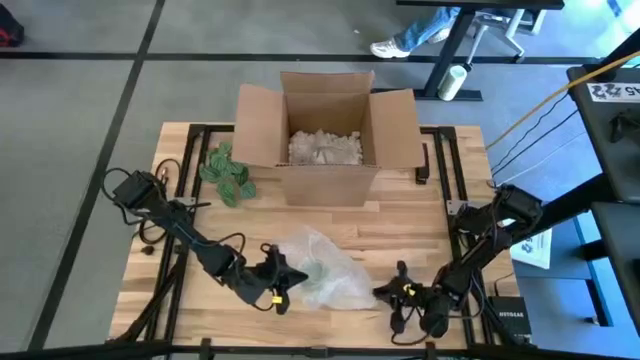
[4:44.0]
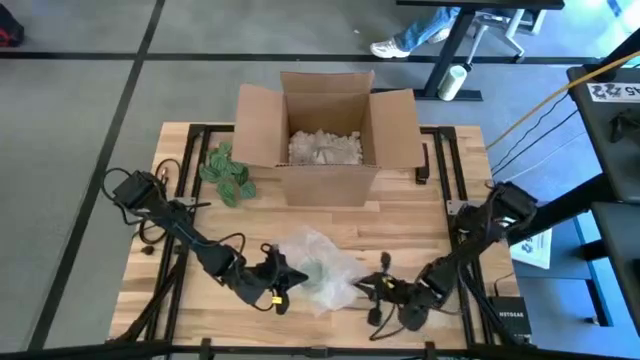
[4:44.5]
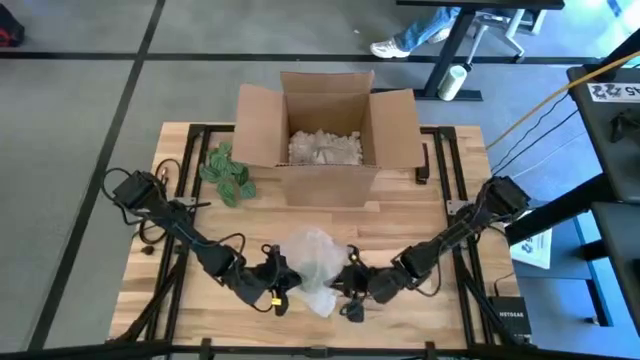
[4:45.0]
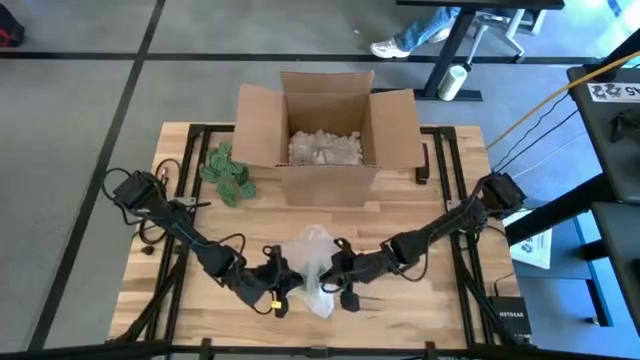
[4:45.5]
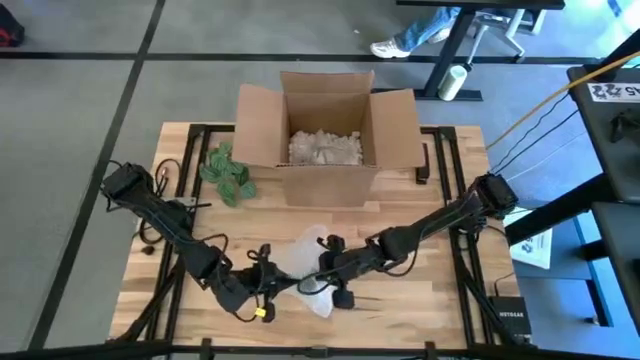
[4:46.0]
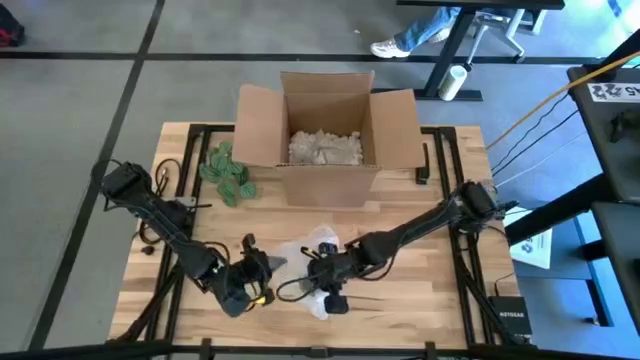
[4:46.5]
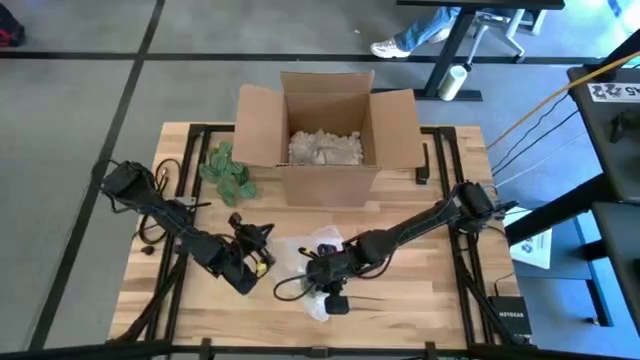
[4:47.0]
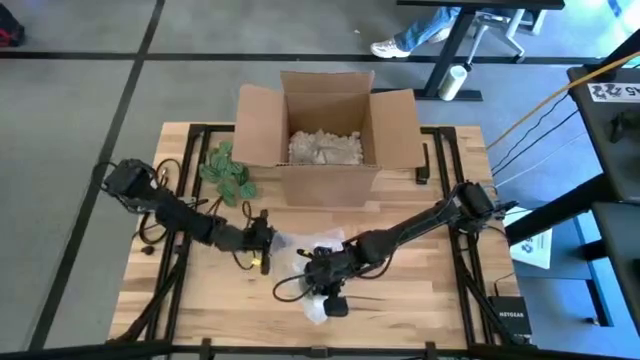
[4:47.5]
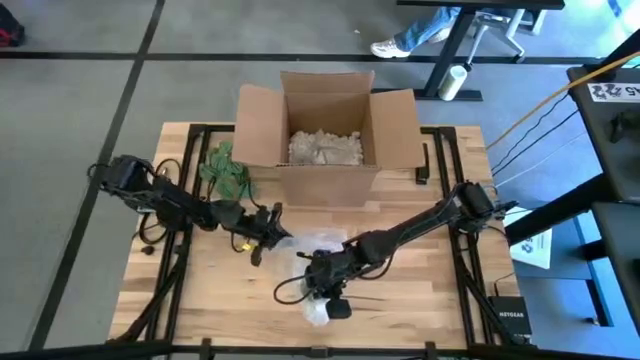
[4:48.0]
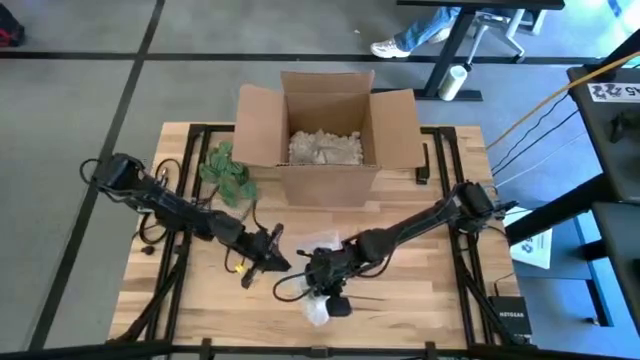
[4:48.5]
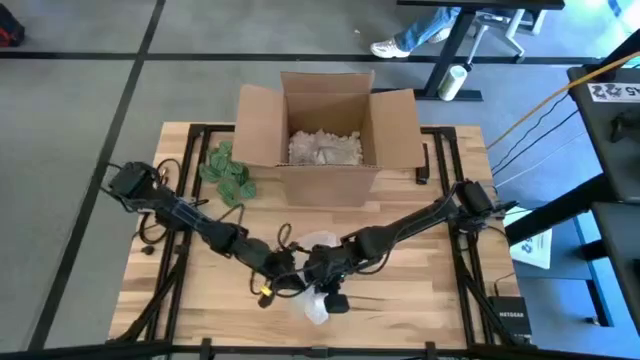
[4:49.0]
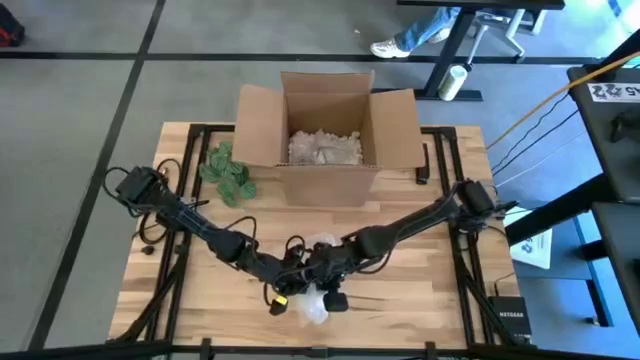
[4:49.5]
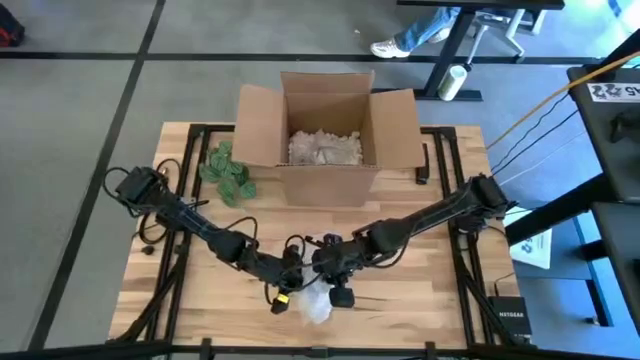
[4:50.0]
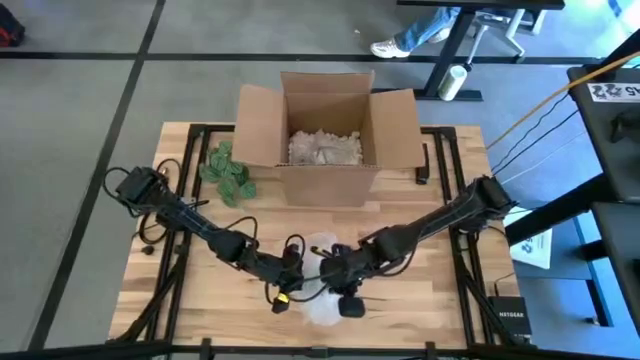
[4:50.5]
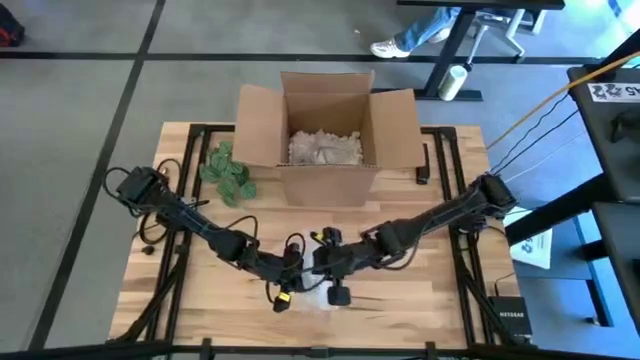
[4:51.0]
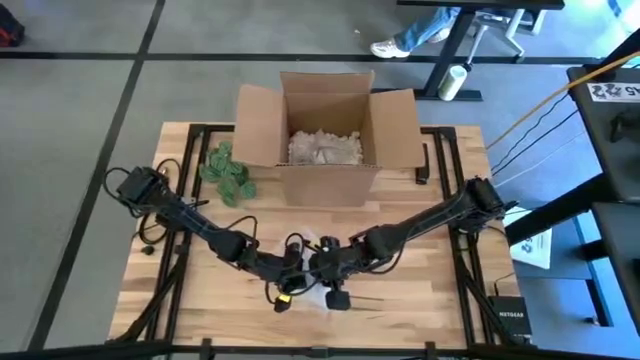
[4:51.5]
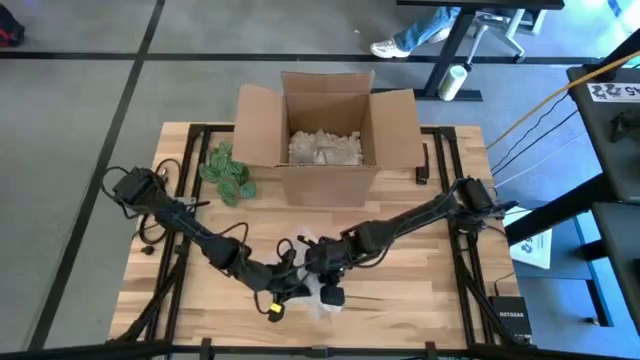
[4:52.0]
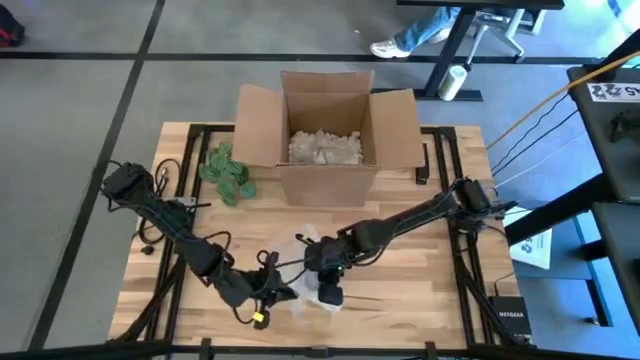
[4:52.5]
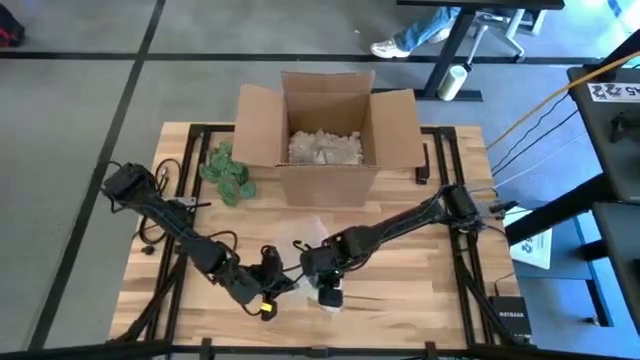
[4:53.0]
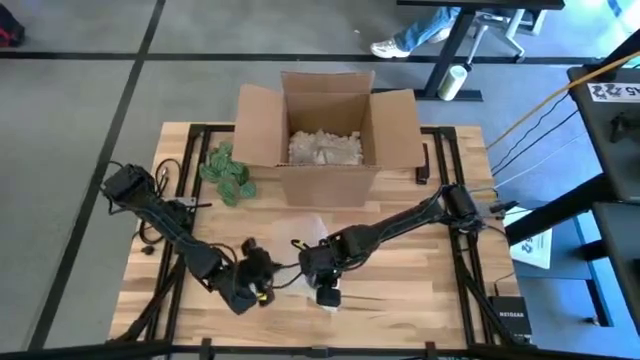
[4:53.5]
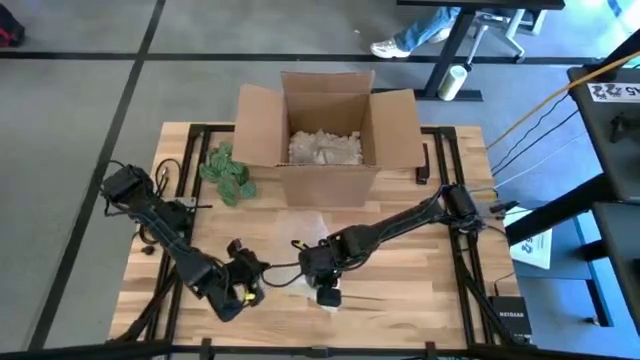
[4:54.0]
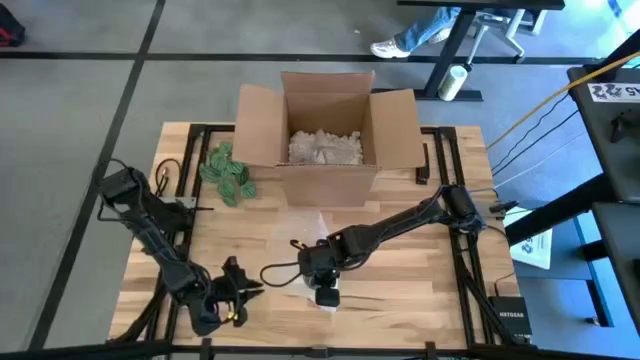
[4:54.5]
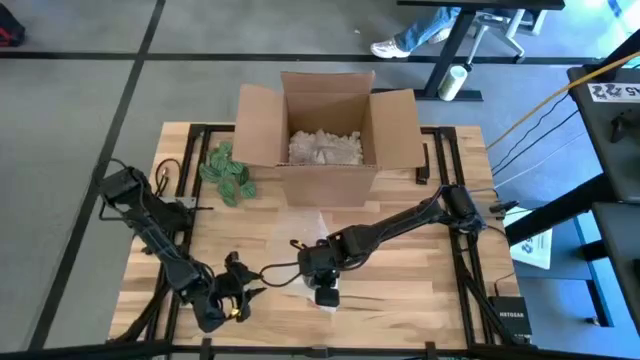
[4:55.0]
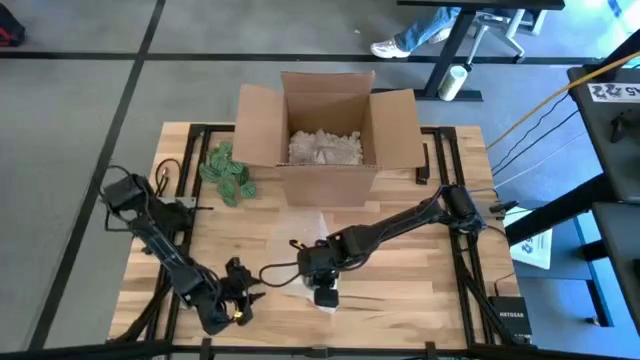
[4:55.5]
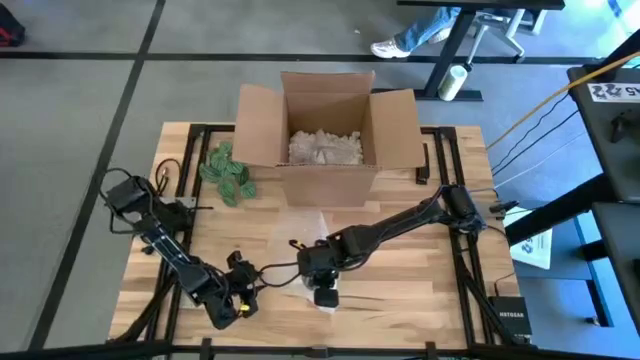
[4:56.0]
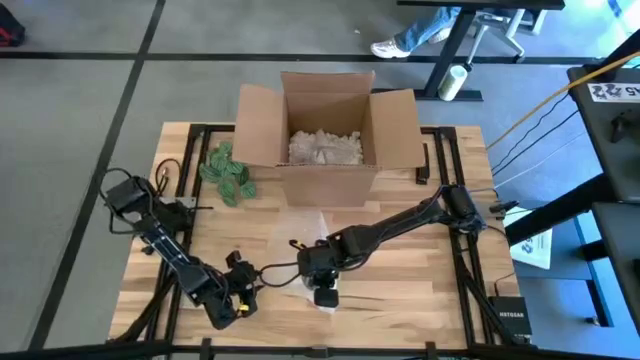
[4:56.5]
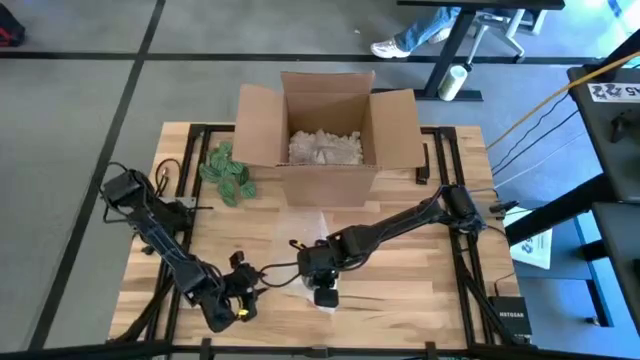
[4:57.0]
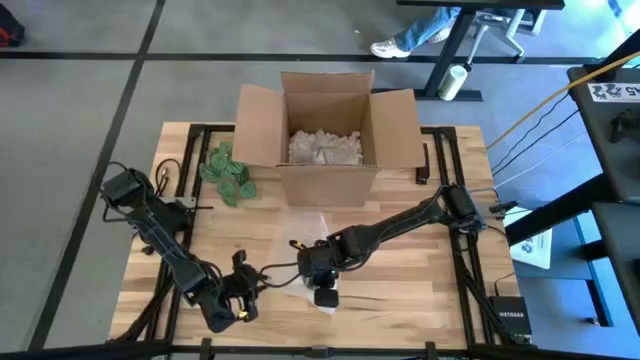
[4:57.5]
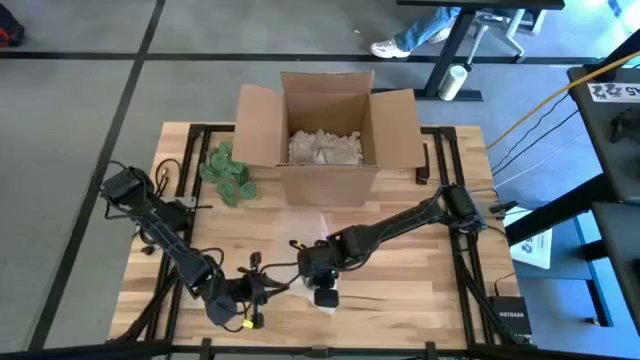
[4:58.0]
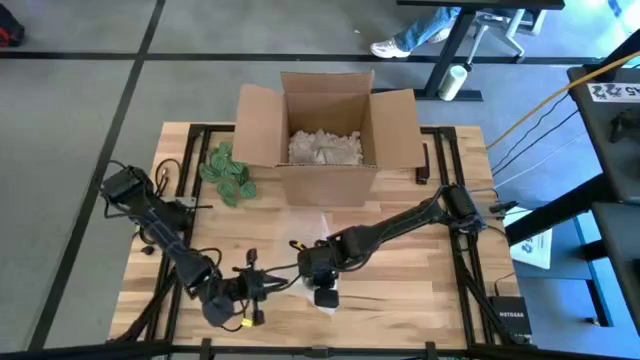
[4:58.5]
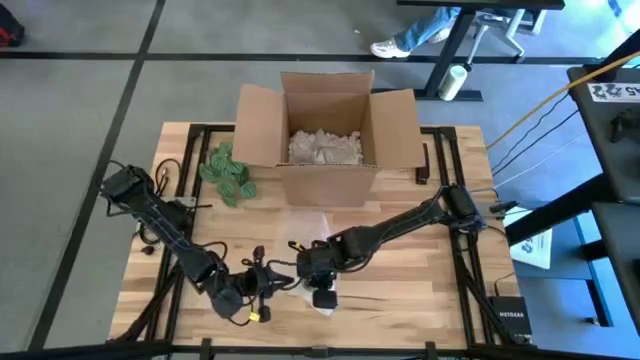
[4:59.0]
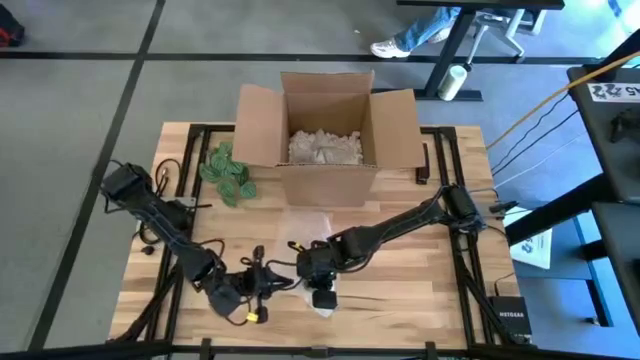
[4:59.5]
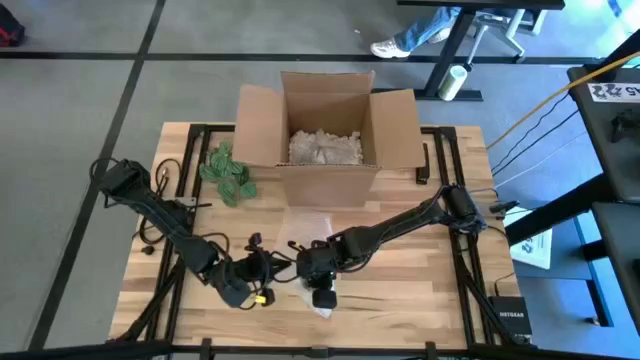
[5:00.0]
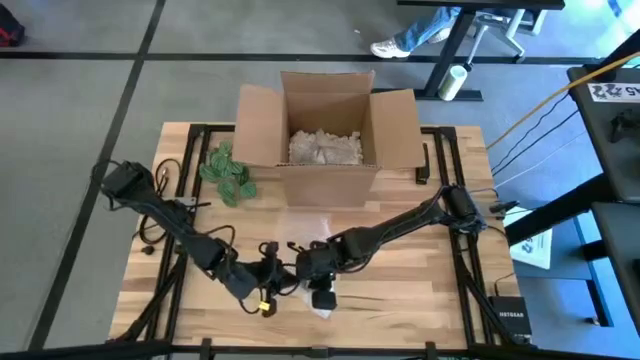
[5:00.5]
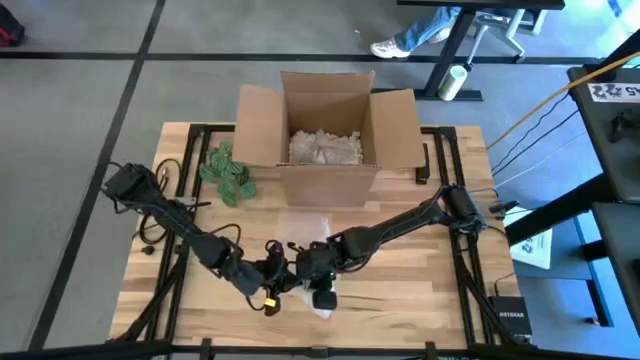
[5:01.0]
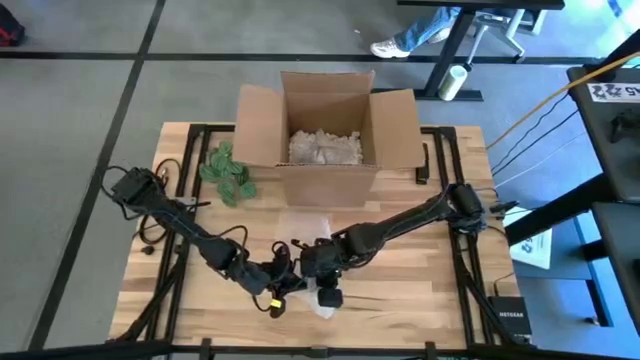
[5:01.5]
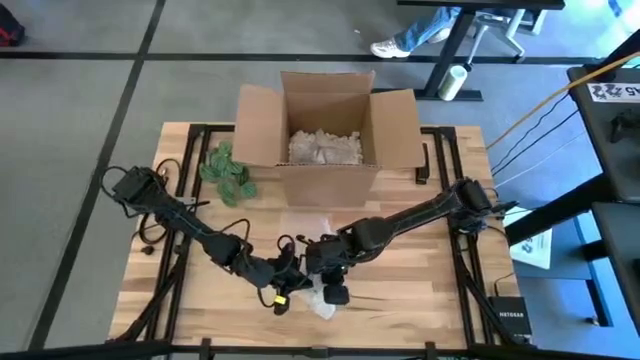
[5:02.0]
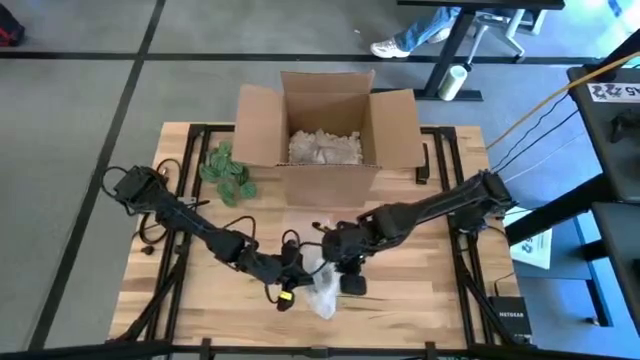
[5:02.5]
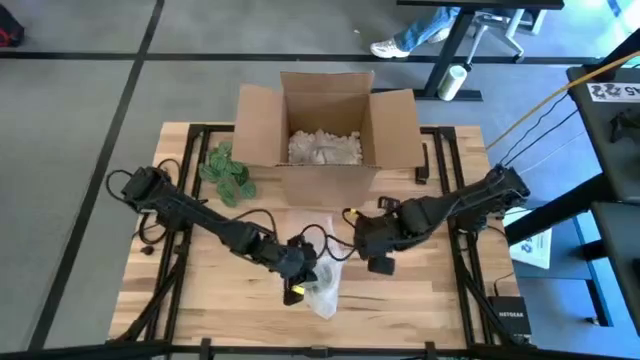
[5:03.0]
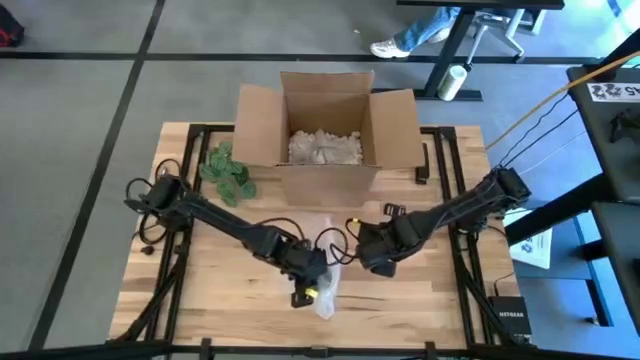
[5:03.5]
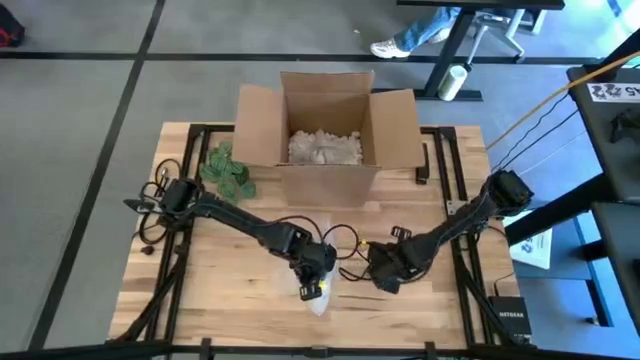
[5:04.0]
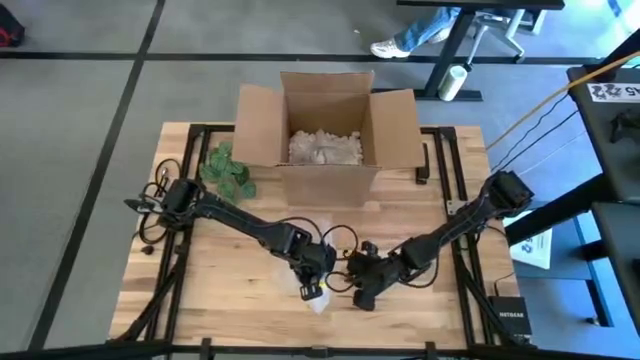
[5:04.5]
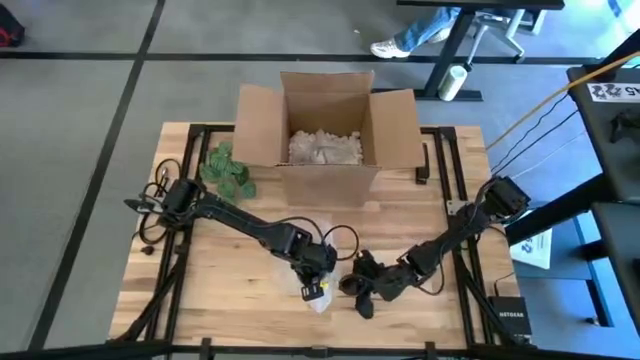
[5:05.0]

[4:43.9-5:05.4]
Task: wrap mug
Wrap the green mug in bubble wrap
